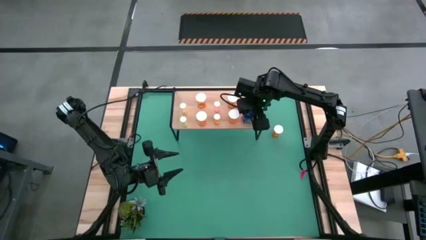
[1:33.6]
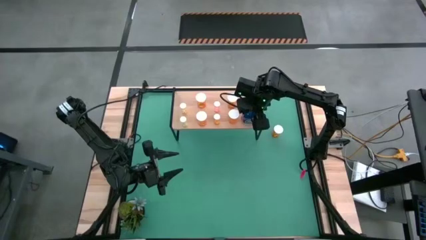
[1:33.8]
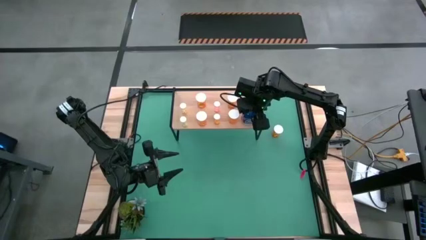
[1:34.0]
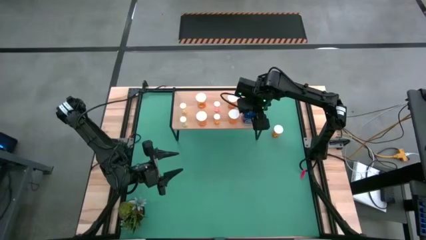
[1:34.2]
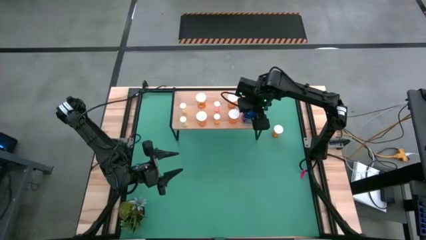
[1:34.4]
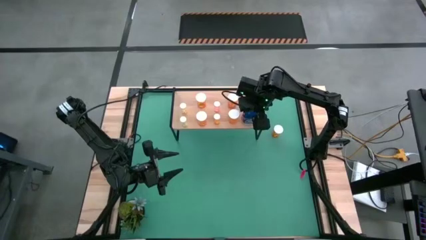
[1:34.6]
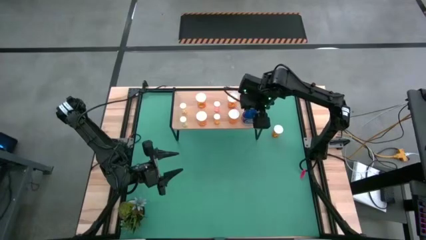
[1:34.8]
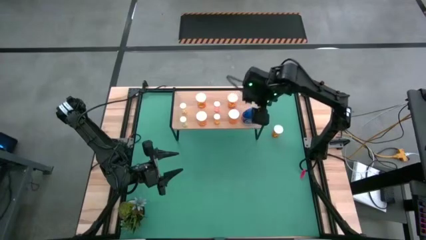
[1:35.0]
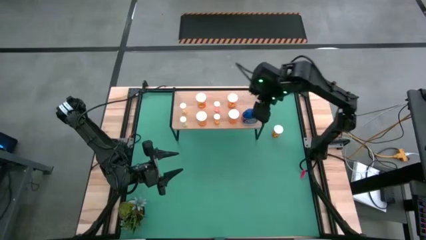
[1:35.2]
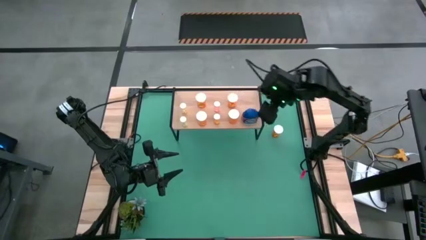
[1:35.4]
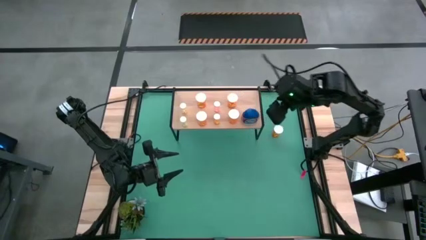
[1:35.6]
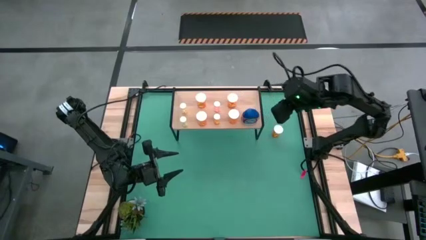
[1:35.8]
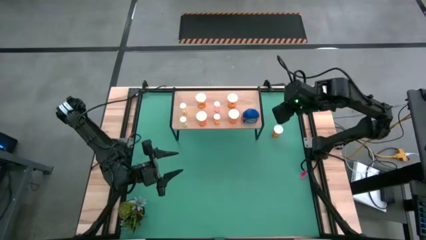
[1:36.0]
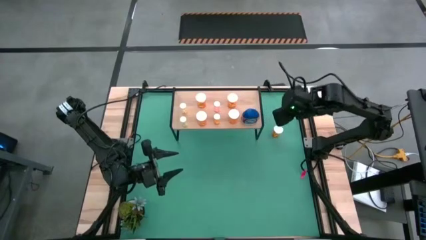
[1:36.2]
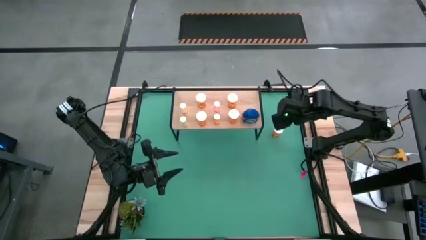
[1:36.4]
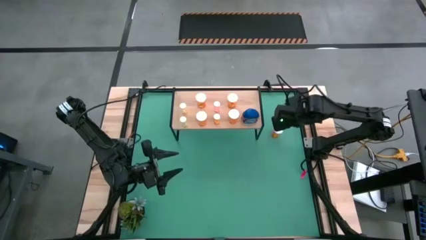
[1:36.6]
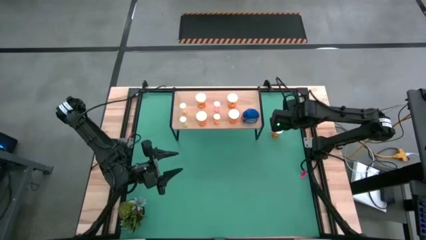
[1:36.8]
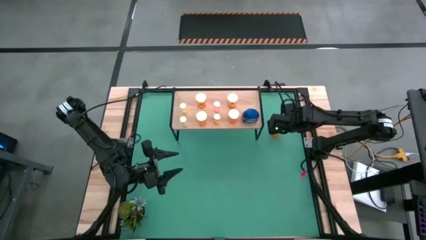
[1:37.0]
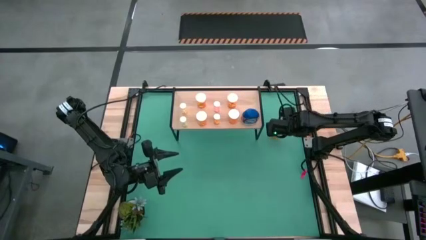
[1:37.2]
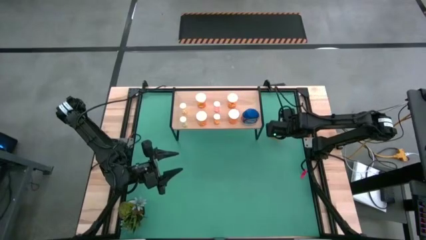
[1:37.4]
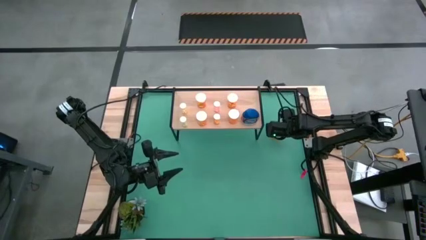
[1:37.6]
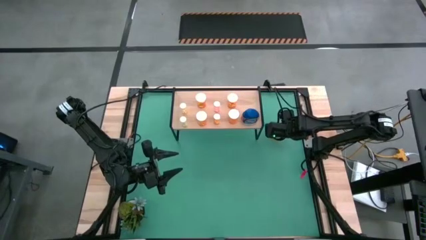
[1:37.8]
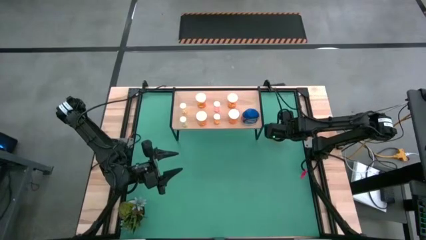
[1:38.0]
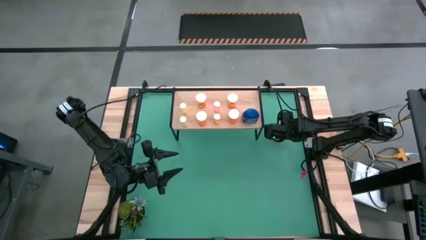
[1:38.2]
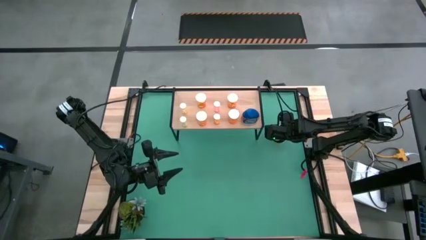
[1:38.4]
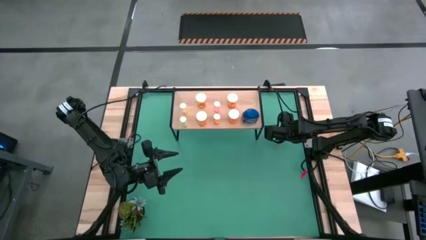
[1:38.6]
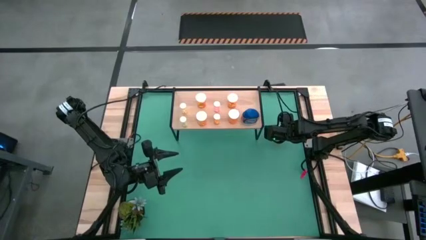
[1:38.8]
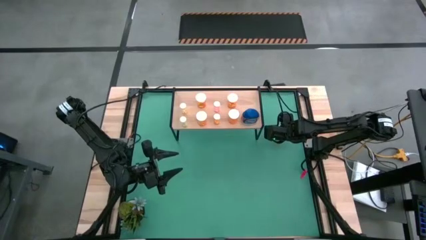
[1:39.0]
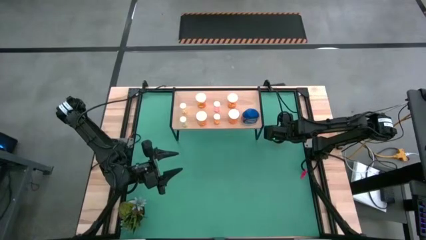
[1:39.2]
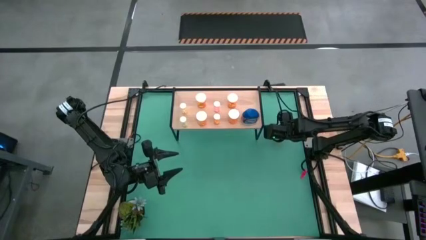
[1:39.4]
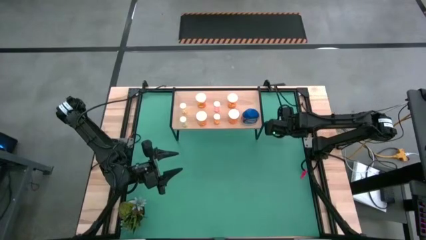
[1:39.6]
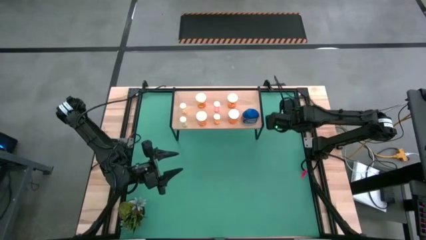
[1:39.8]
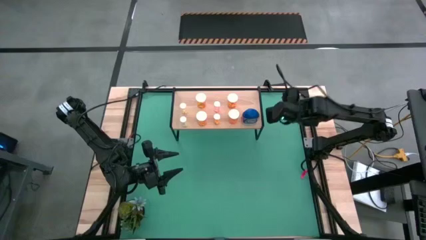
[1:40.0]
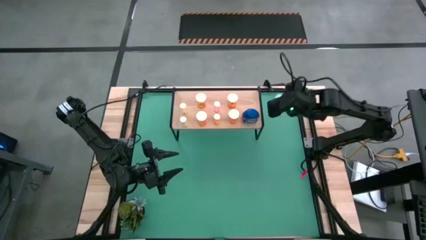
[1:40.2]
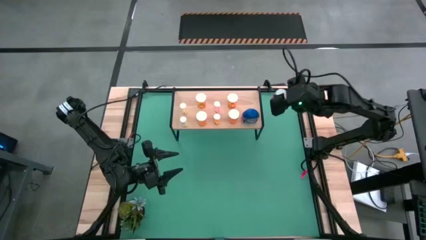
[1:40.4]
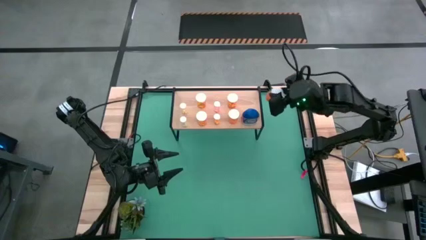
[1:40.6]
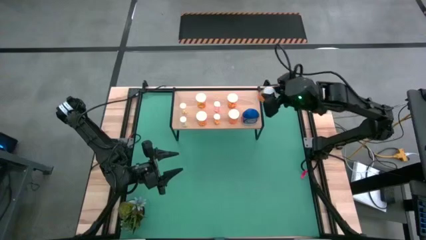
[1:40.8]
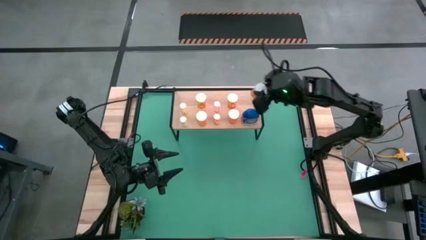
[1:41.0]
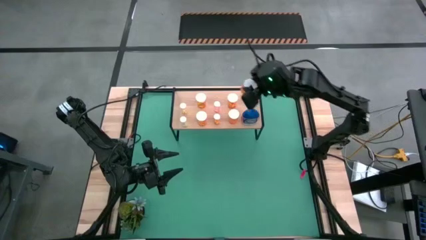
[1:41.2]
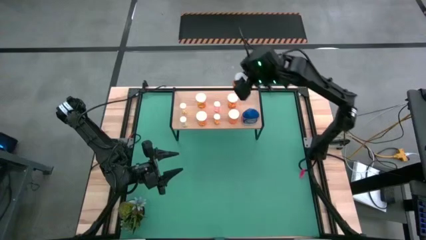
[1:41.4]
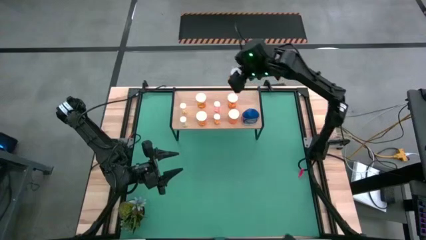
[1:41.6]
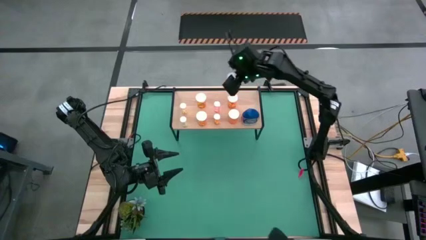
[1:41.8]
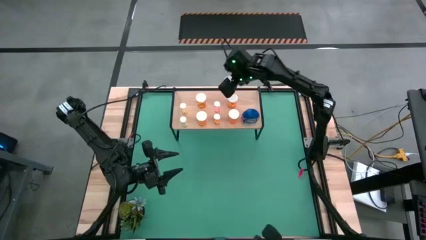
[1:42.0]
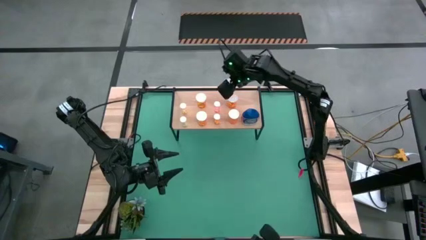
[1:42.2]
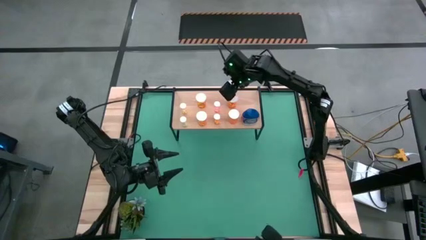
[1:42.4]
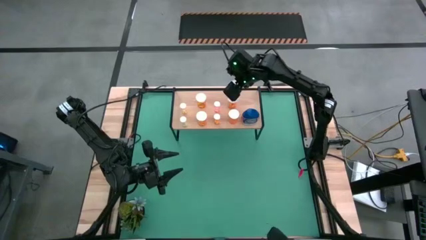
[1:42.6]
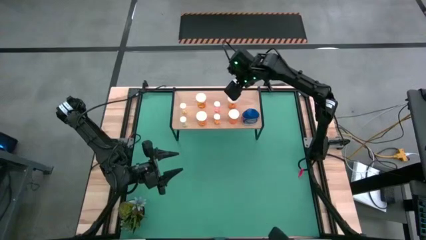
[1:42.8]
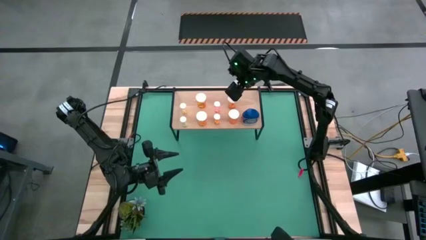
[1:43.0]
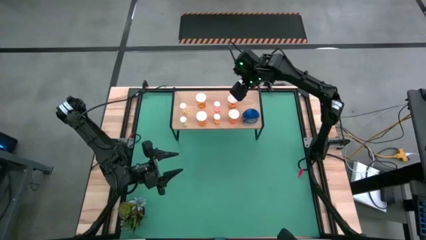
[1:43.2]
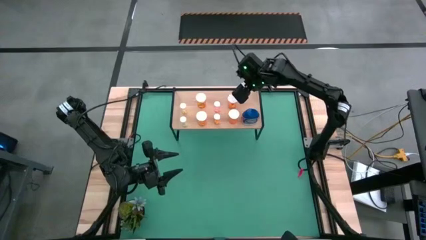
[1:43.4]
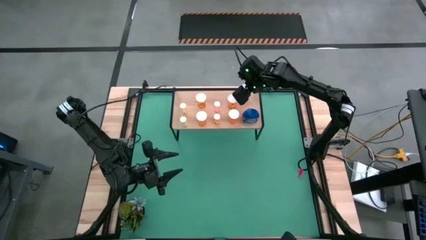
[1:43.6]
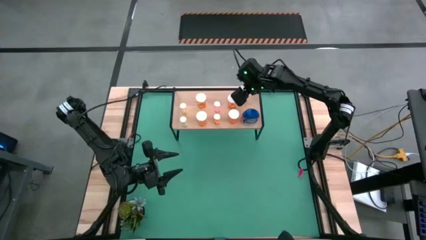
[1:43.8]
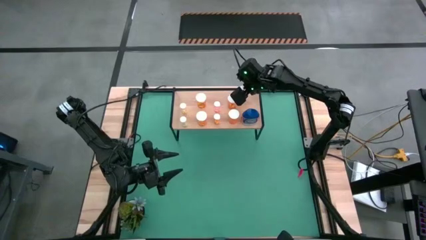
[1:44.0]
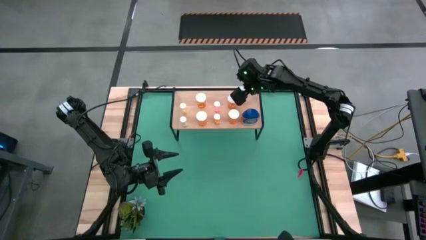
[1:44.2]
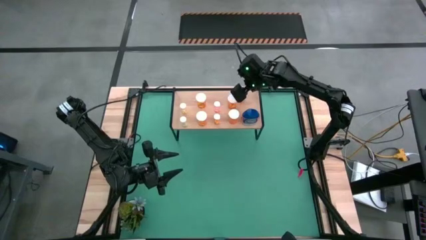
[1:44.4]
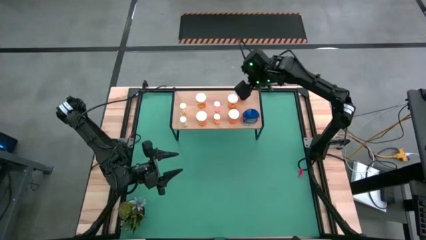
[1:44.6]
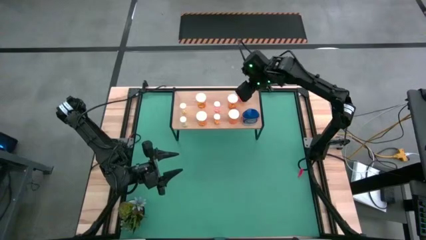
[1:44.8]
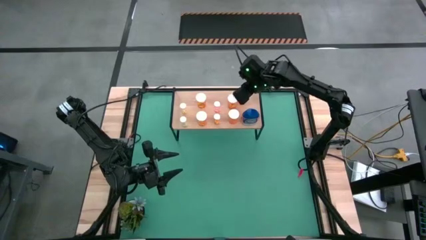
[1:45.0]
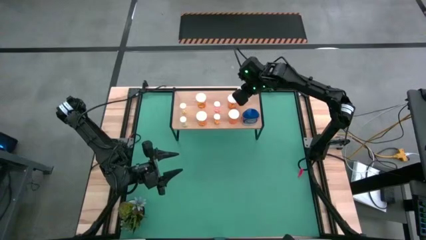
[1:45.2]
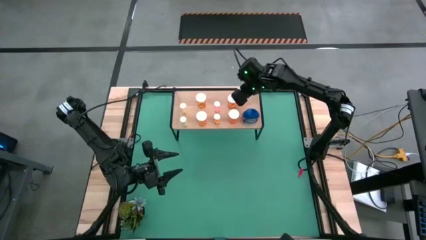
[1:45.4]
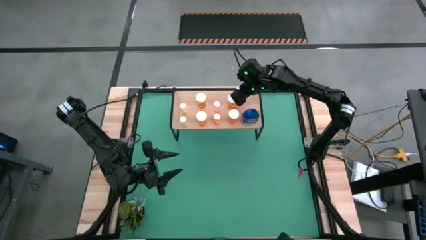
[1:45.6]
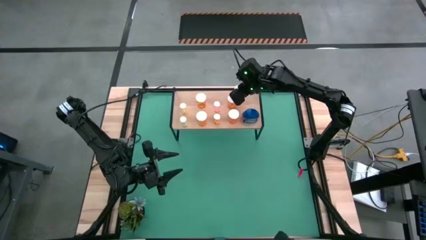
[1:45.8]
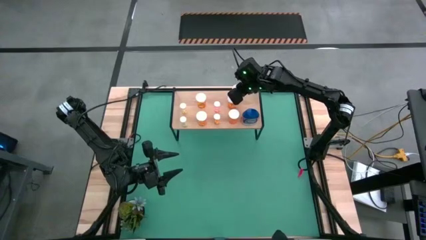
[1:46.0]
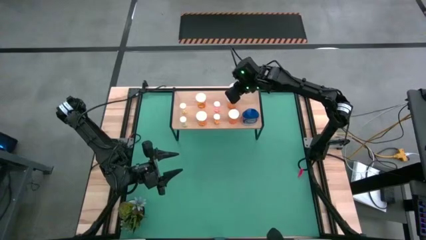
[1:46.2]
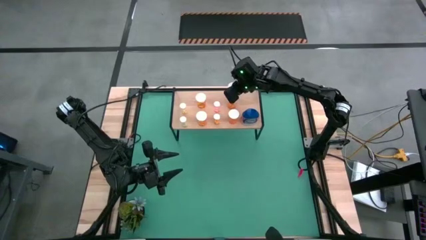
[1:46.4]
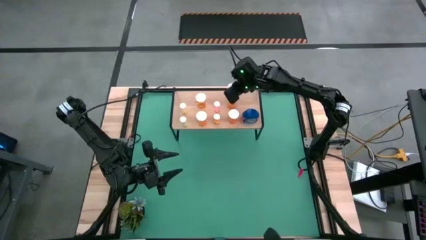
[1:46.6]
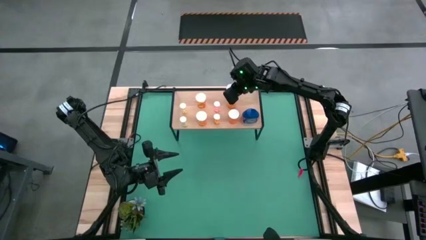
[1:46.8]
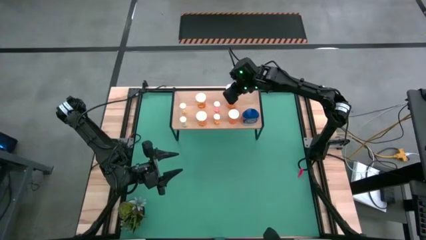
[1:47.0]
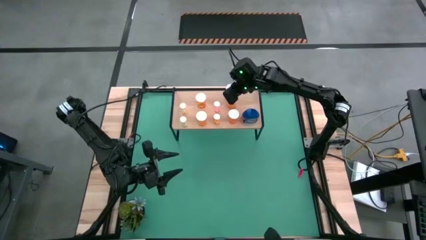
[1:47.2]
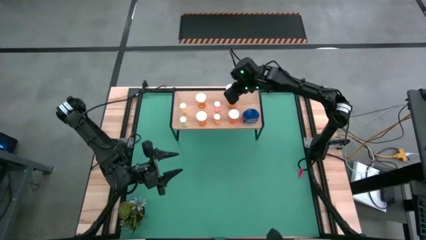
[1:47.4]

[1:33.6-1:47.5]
Task: Pick and place medicine bottles onto shelf by color
Put the big orange pill bottle on the shelf

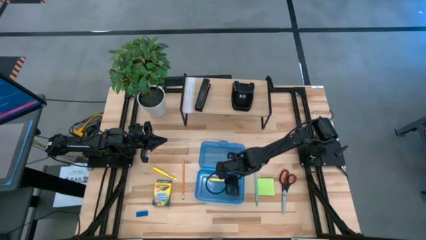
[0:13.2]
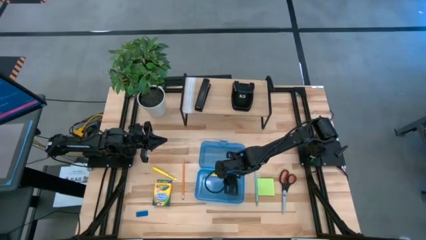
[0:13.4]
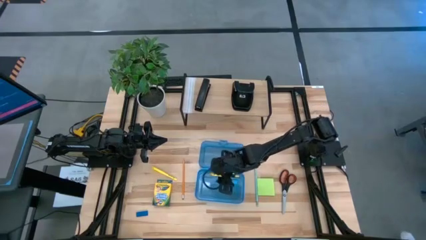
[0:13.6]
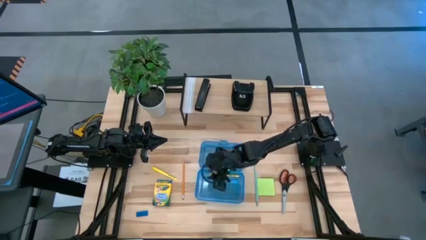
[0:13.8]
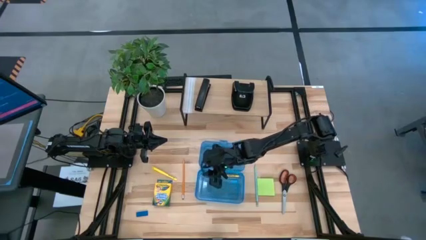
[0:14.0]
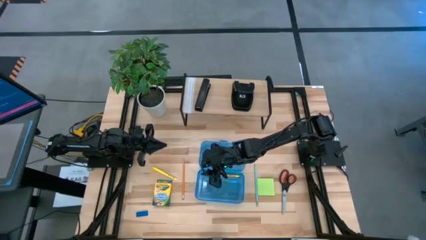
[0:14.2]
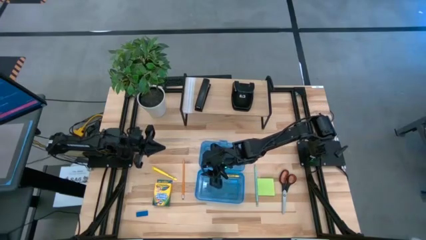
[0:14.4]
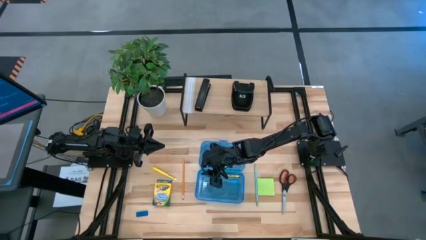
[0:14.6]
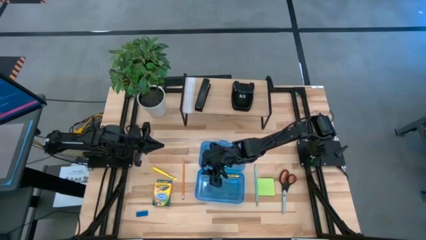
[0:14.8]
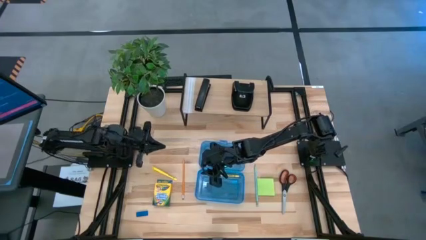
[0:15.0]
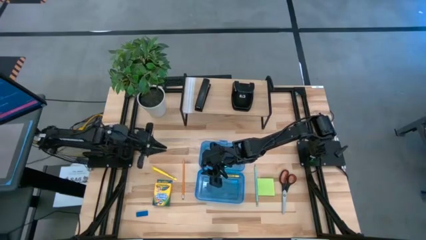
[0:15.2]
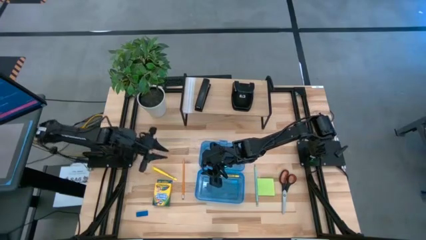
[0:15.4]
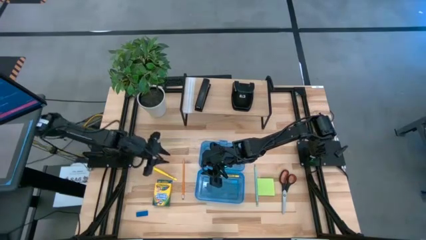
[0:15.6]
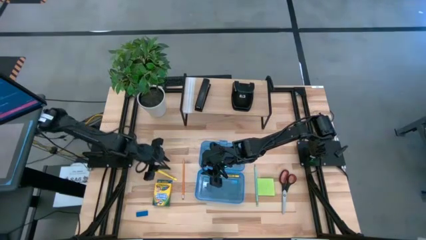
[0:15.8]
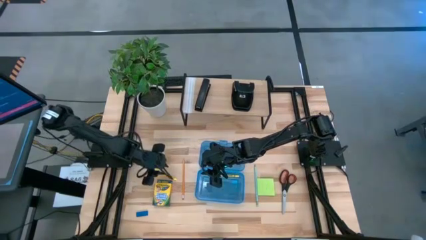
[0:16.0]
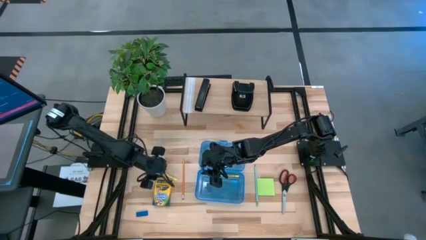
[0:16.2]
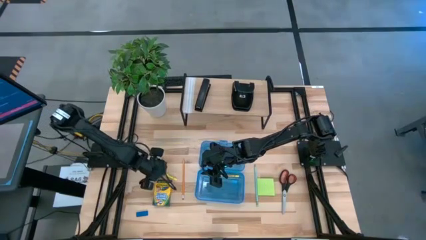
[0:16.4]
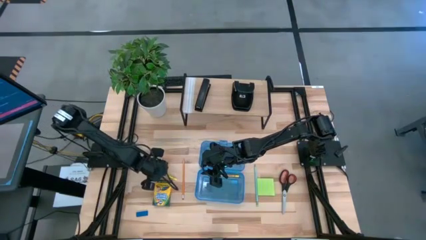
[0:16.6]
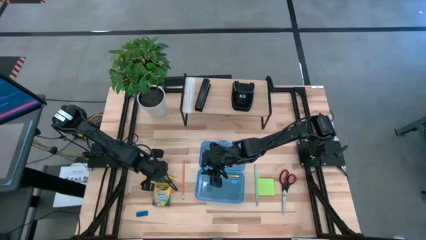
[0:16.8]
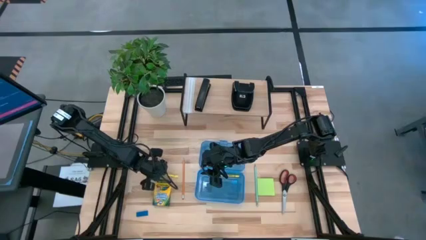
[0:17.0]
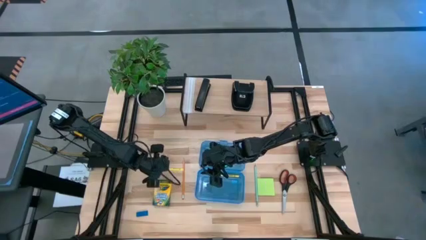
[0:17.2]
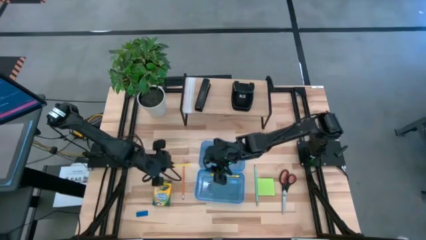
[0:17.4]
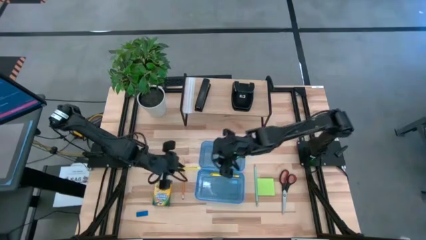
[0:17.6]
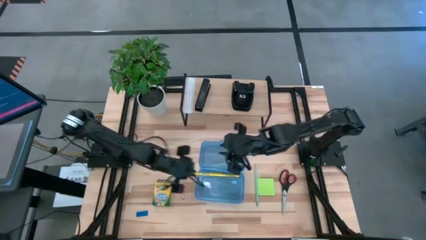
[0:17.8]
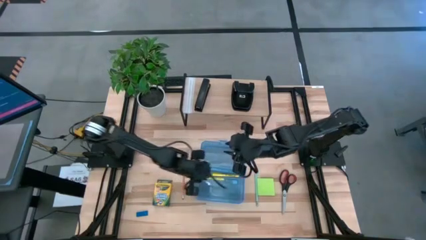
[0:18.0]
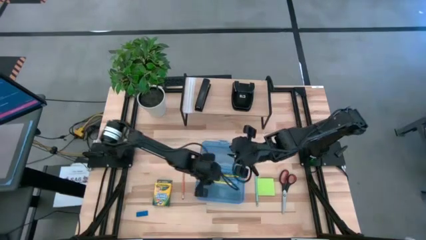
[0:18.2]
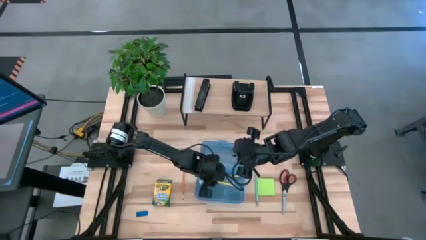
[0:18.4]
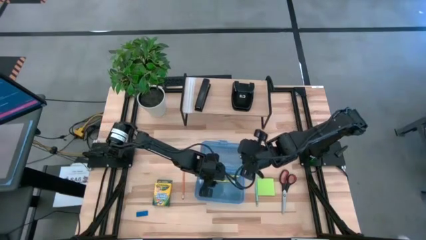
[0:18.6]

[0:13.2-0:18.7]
Task: Pack school essentials
Put the yellow pen into the blue supply box
